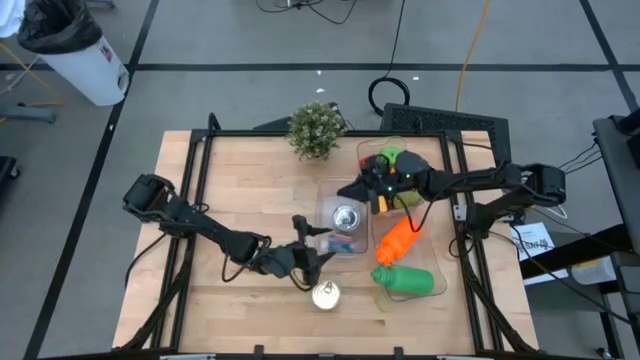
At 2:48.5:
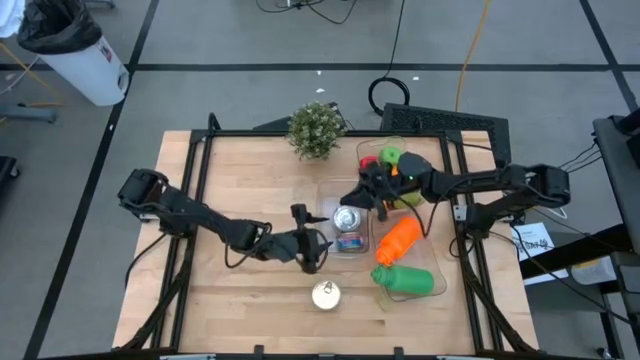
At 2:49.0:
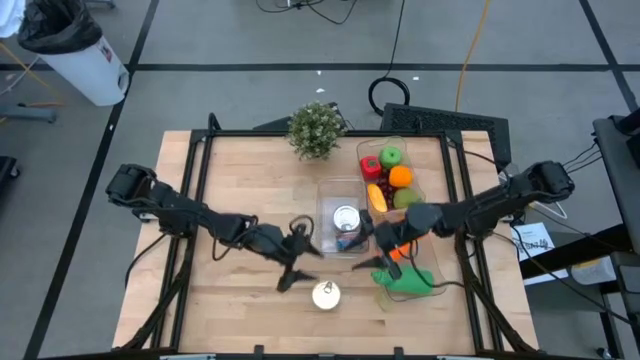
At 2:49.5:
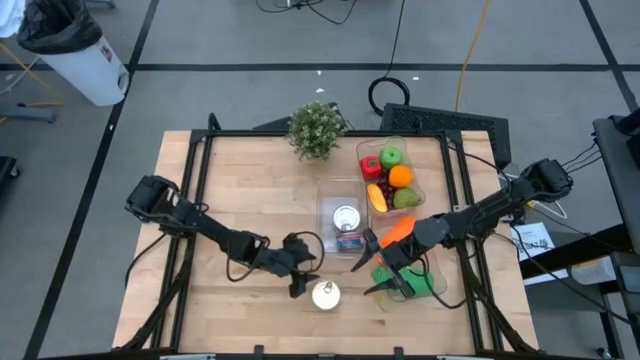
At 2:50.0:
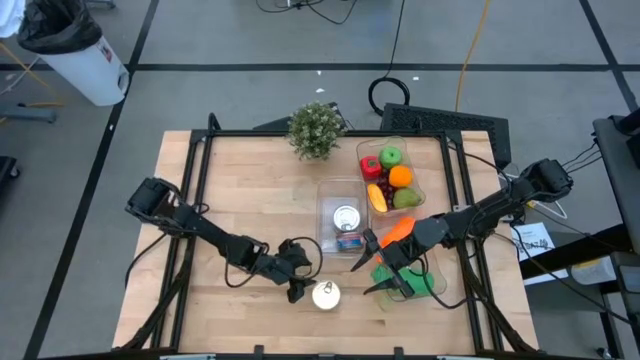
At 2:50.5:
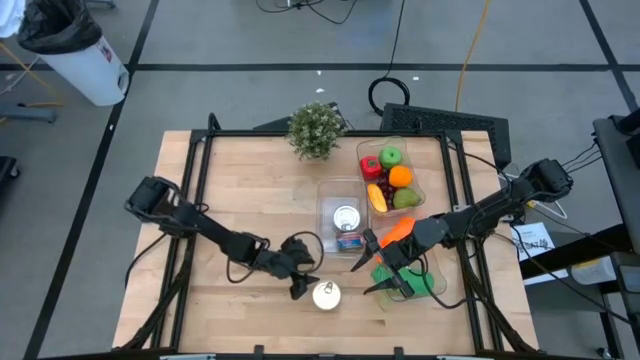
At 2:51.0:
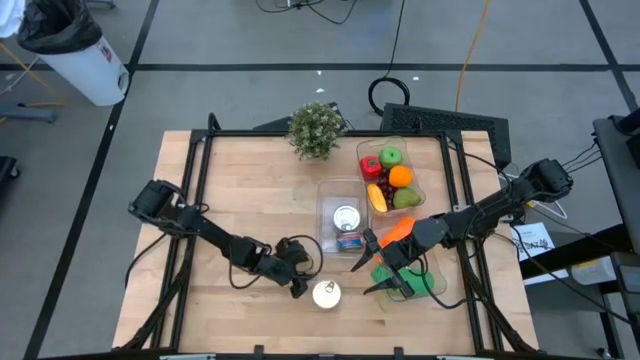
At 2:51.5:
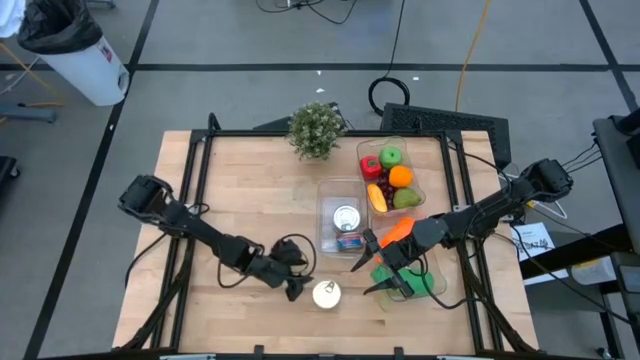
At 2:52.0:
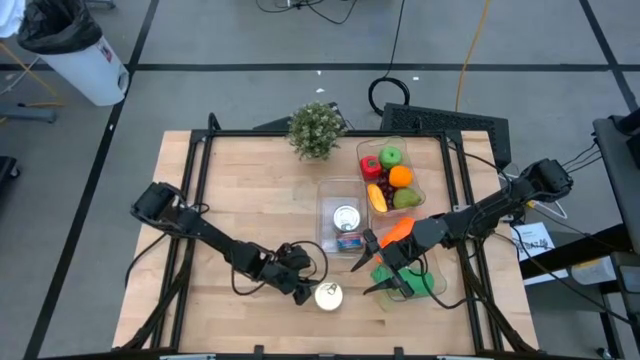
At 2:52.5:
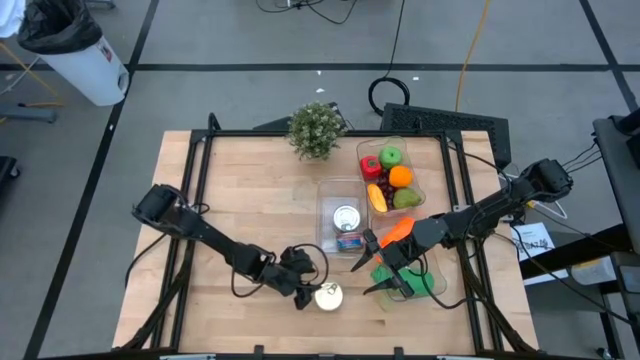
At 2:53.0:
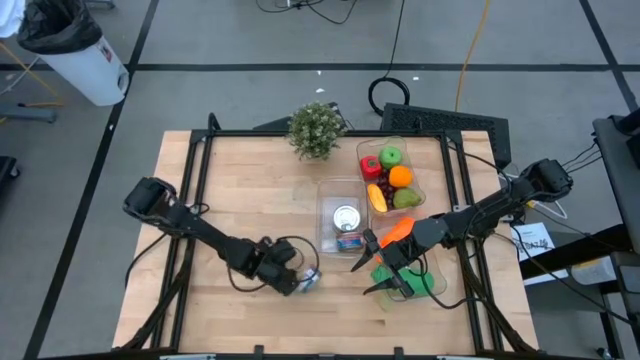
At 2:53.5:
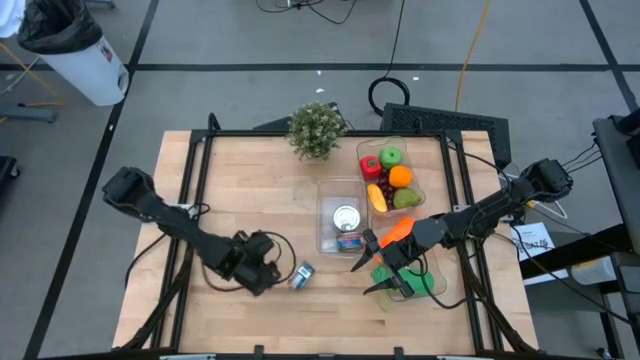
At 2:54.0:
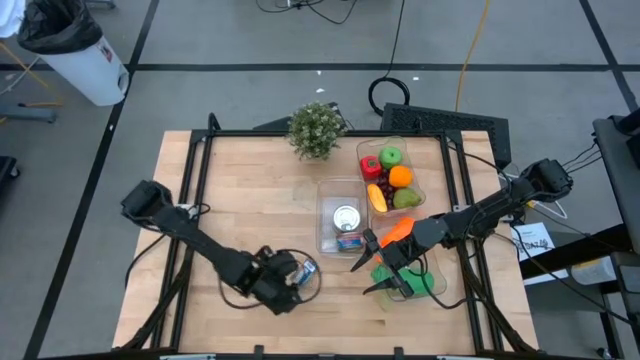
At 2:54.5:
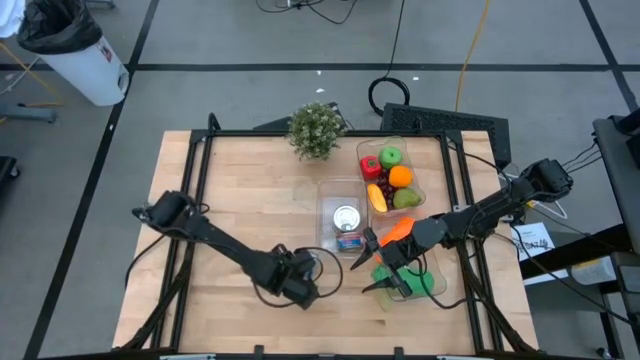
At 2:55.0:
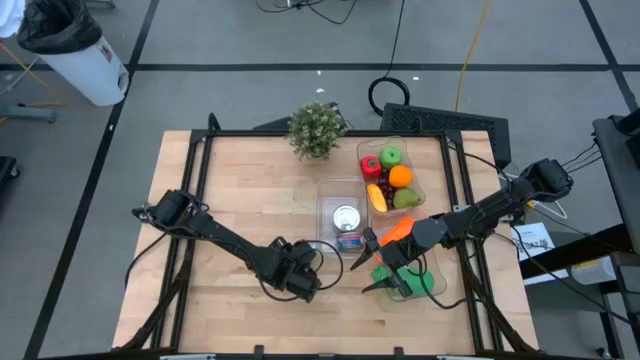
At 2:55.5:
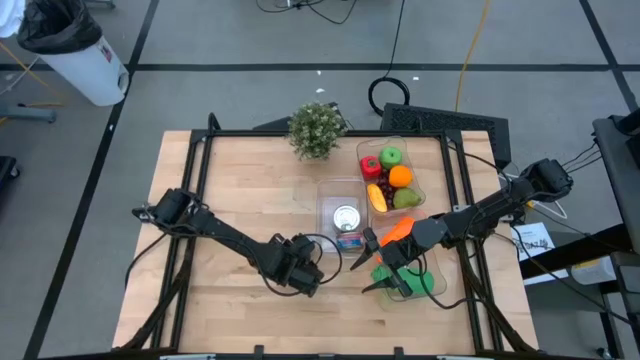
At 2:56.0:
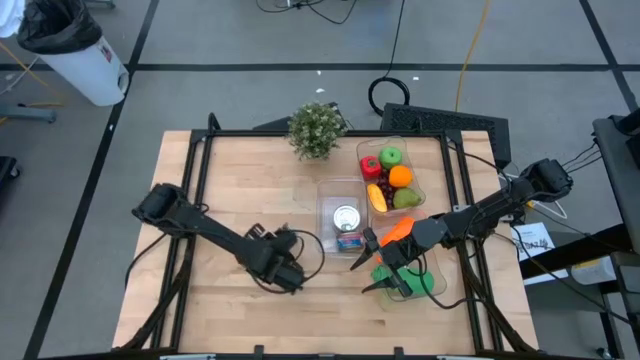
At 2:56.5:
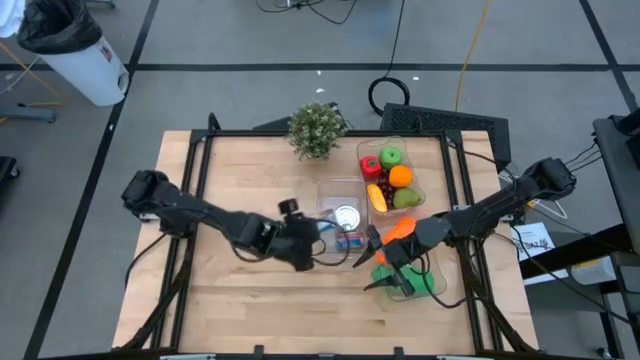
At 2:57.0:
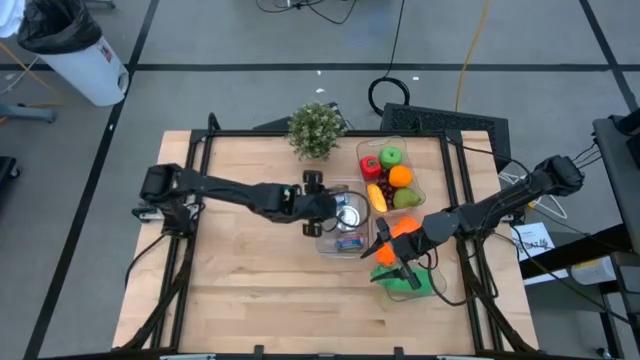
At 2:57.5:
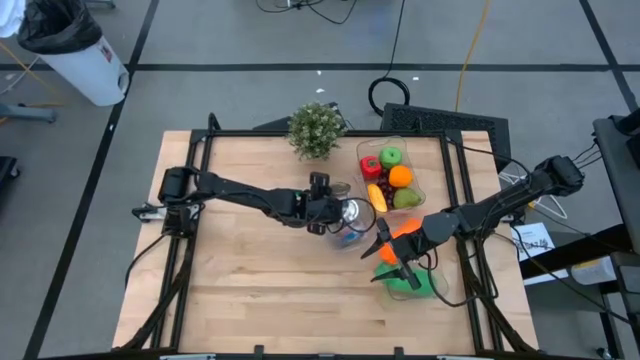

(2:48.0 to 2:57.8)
Task: Pick & Place Food Item
Put the blue tuna can into the middle transparent bin

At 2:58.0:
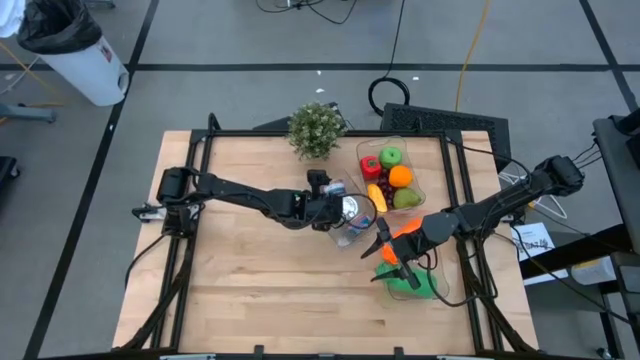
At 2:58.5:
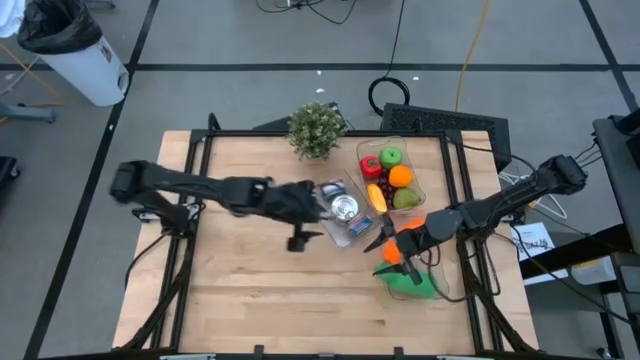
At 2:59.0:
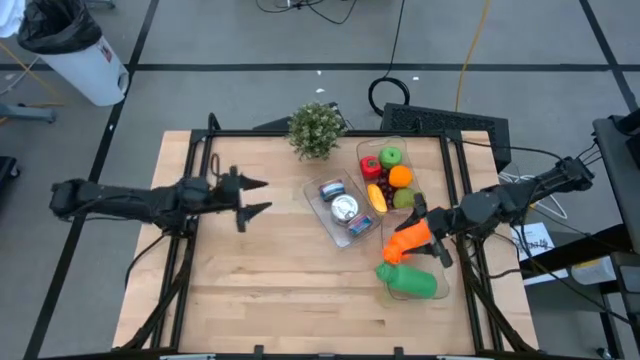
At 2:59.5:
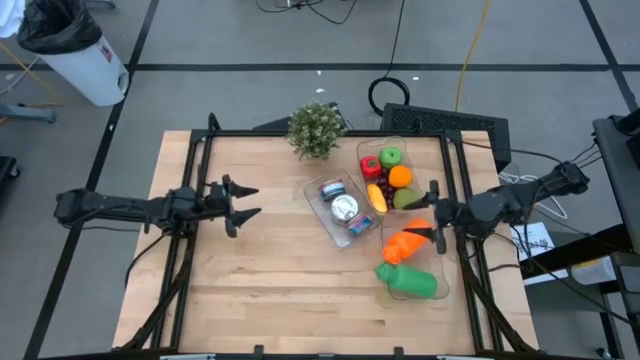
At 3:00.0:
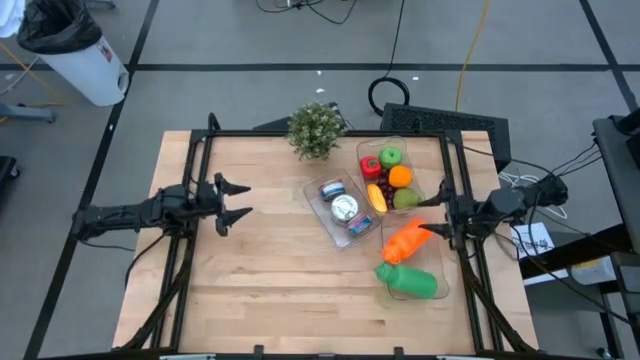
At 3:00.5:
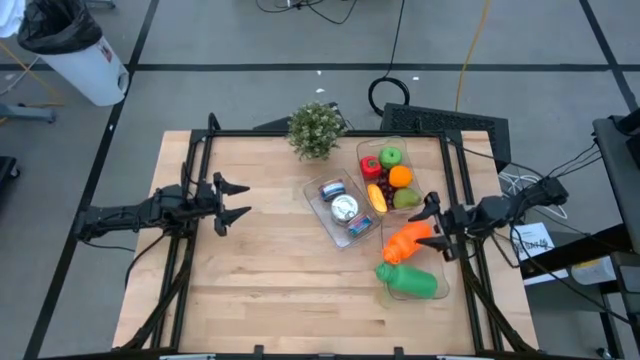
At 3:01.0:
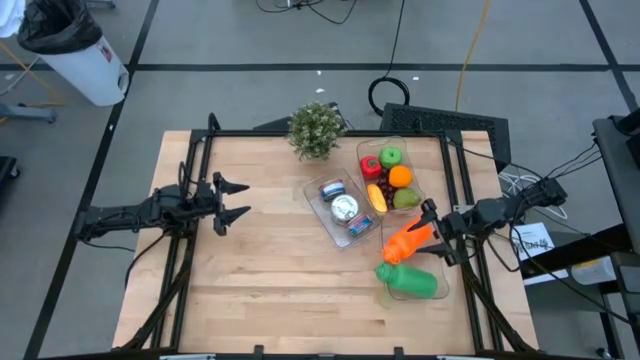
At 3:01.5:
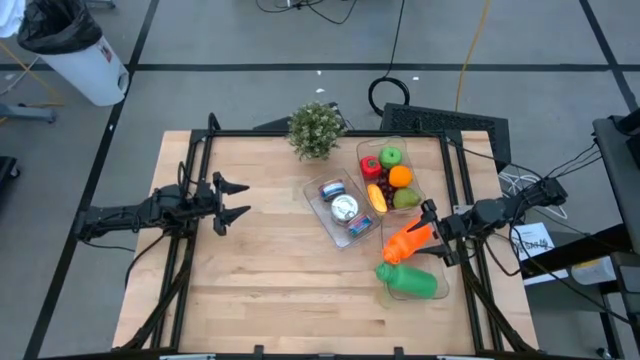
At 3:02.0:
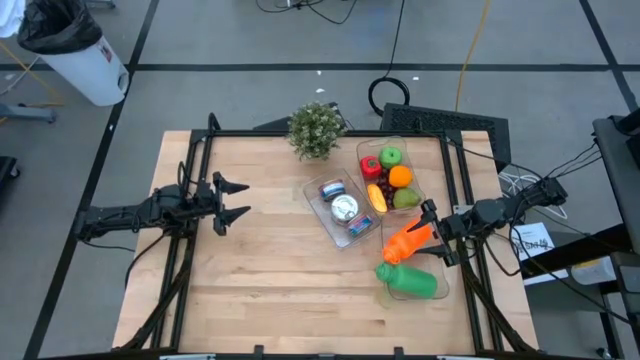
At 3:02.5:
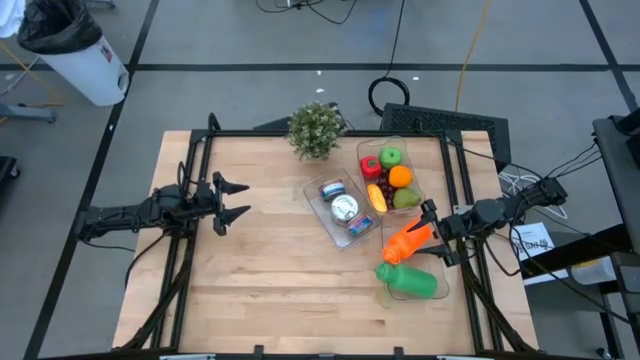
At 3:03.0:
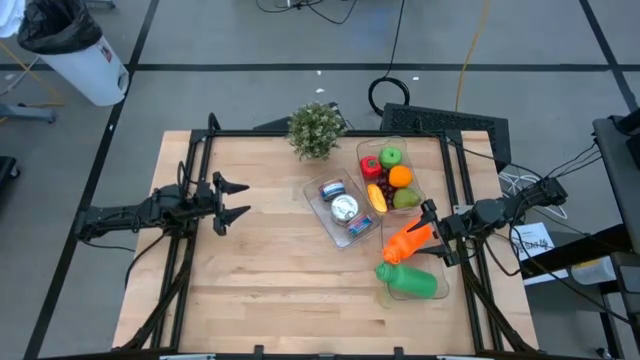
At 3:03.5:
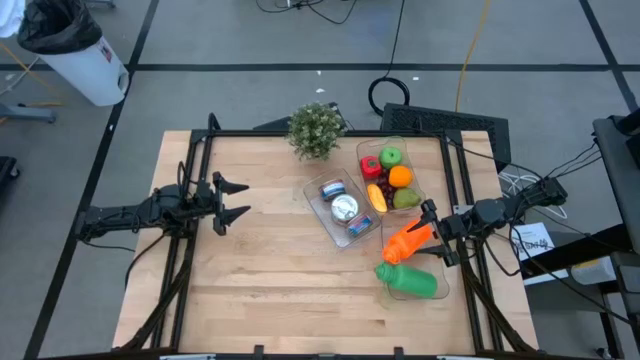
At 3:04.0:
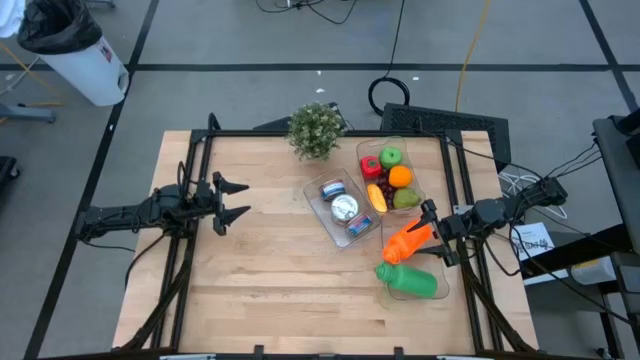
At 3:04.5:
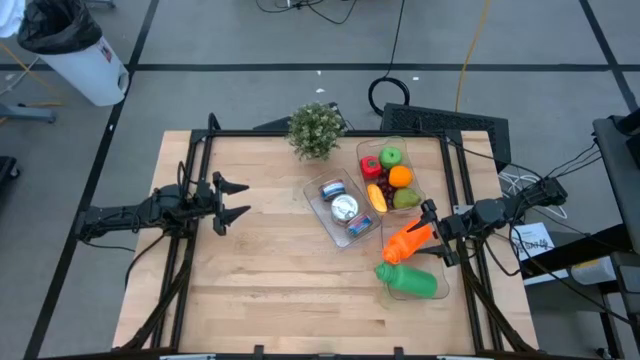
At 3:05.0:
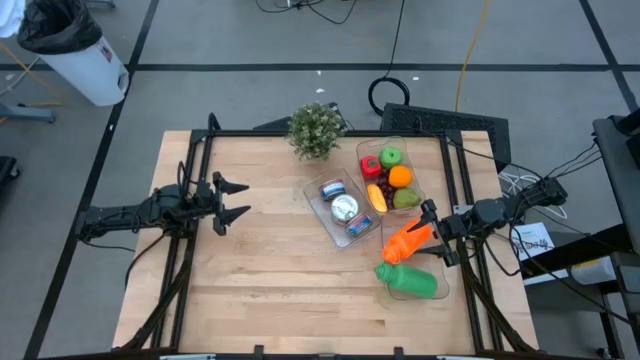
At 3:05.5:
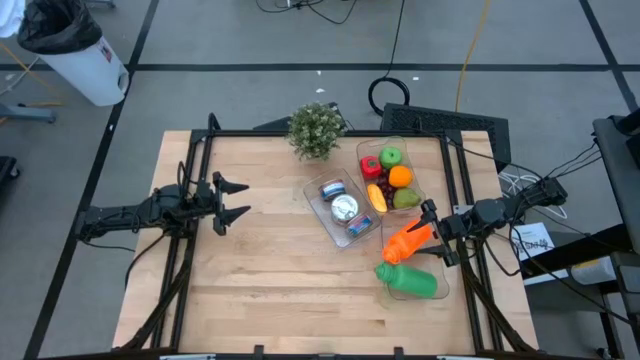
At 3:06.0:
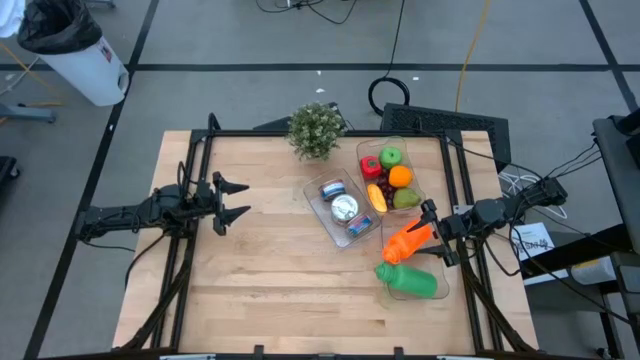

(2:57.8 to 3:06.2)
Return to Home Position

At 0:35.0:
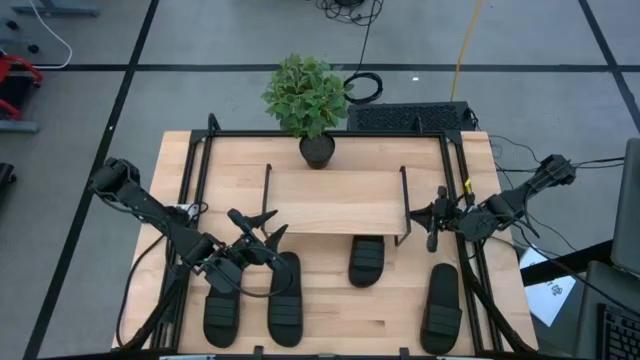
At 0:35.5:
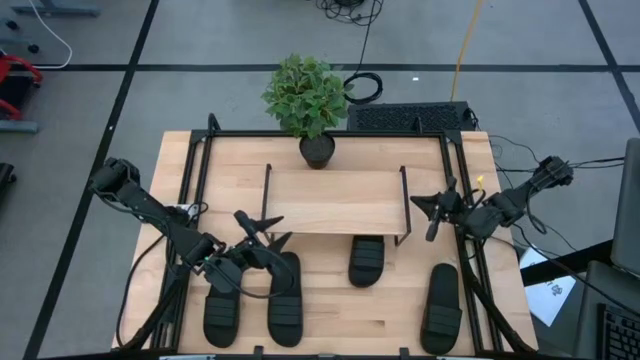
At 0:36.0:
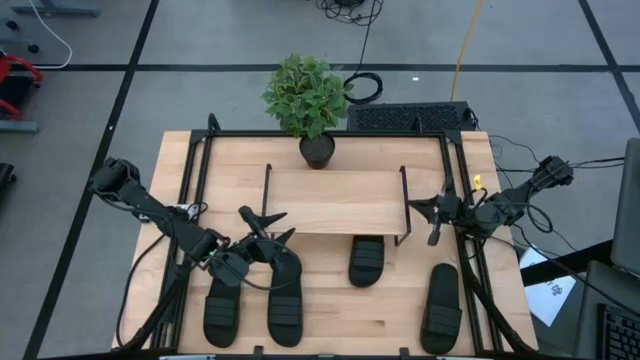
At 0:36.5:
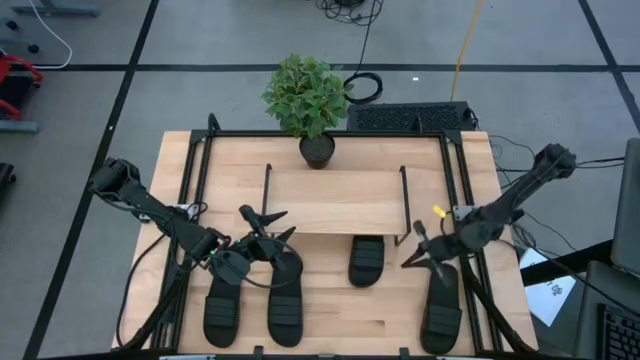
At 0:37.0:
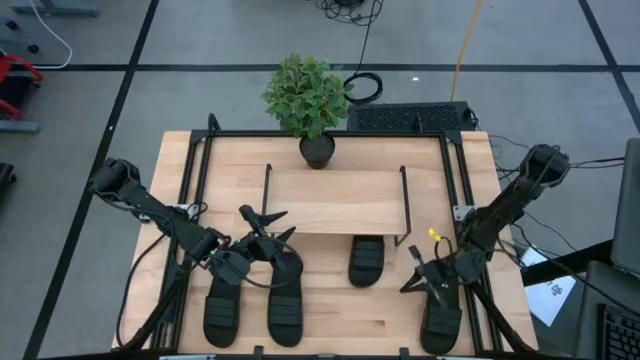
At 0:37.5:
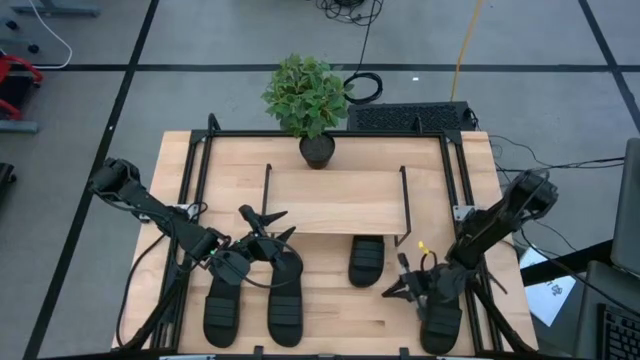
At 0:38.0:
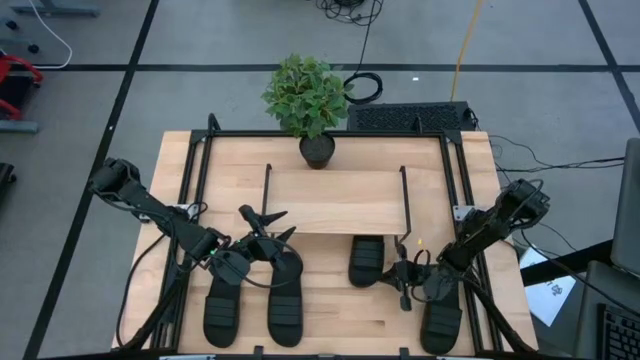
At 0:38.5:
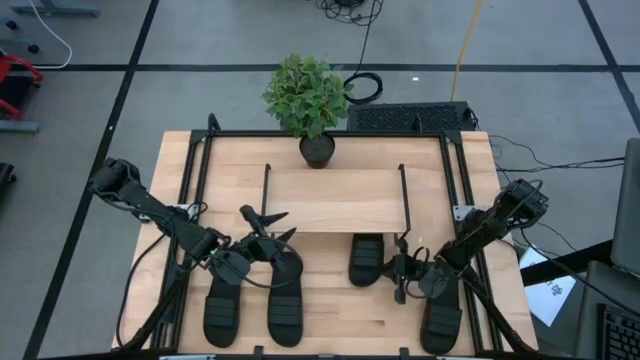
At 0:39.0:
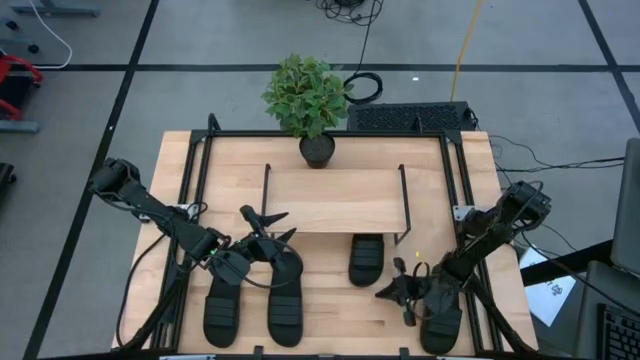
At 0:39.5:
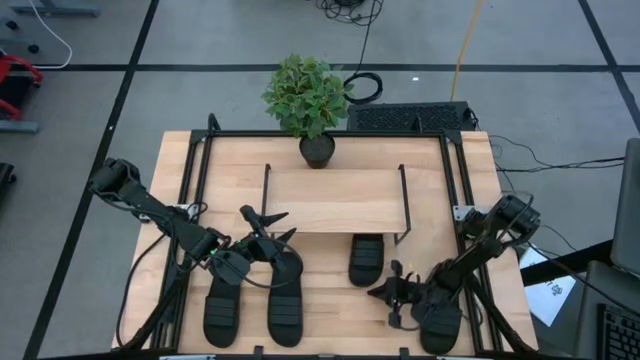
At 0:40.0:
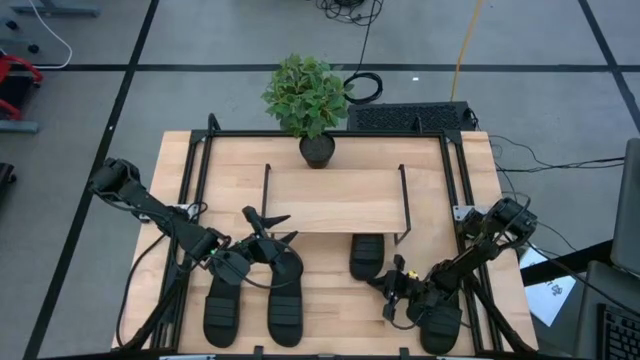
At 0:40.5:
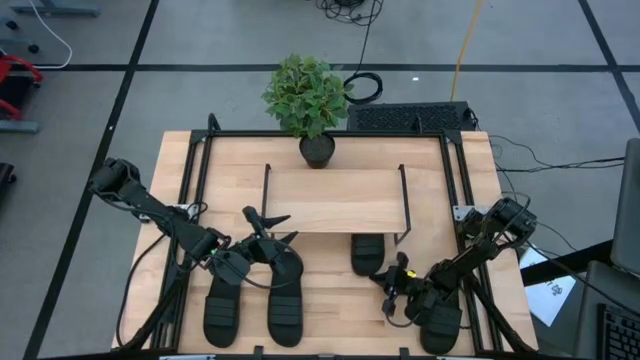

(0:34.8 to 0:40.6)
Task: Pick and place slides into the shelf
Adjust the black slides under the shelf
